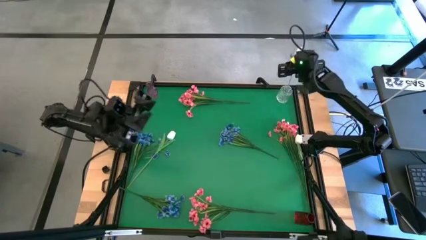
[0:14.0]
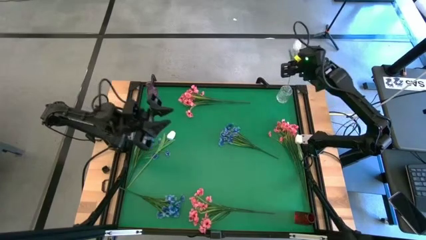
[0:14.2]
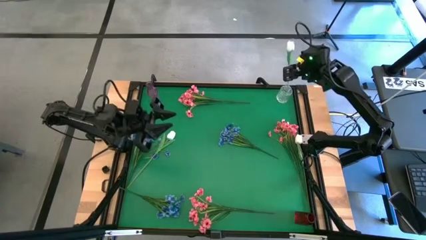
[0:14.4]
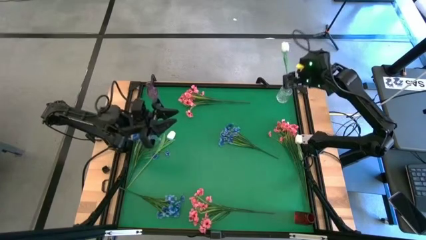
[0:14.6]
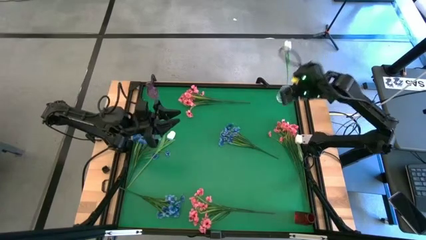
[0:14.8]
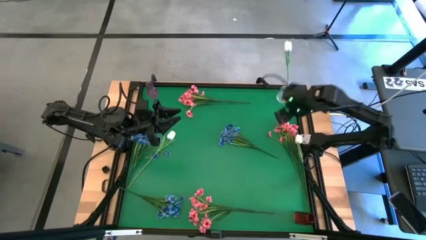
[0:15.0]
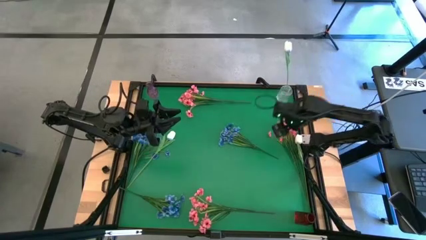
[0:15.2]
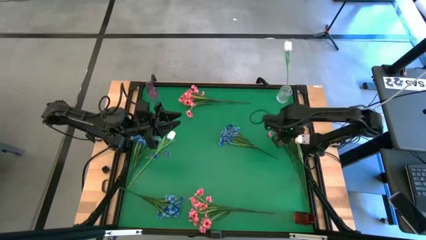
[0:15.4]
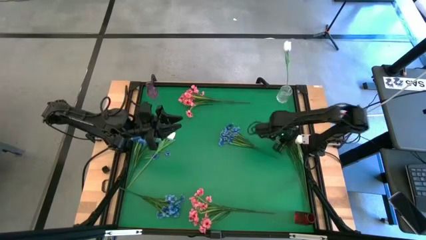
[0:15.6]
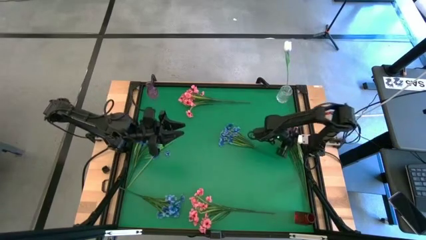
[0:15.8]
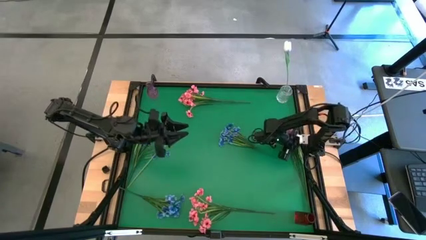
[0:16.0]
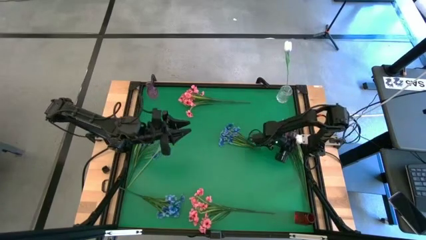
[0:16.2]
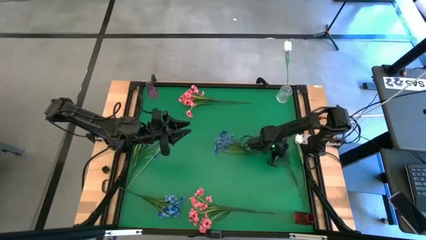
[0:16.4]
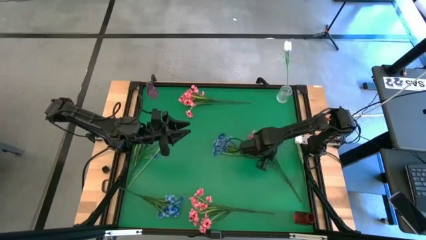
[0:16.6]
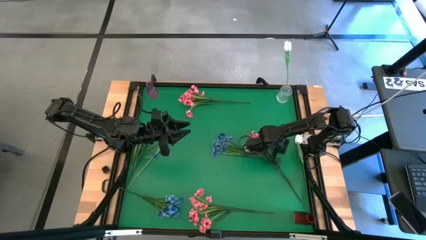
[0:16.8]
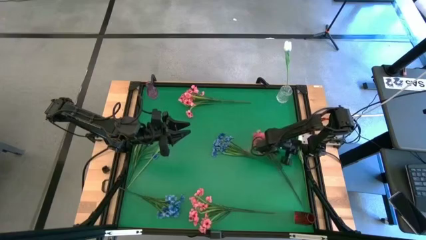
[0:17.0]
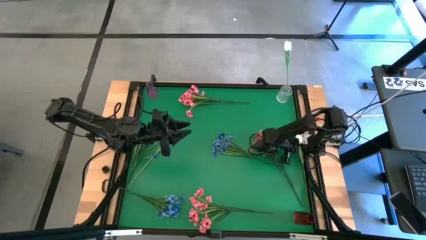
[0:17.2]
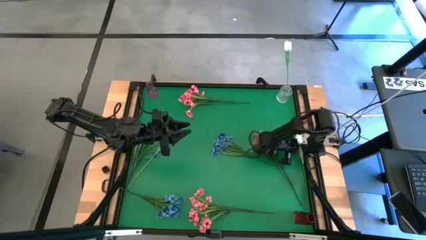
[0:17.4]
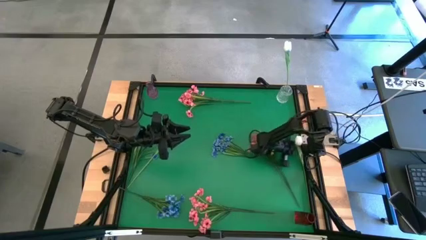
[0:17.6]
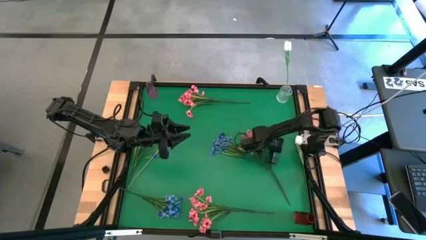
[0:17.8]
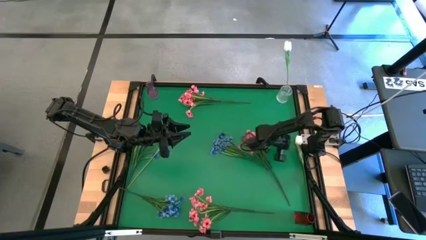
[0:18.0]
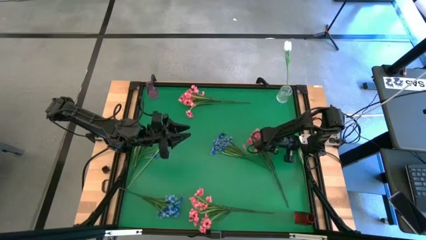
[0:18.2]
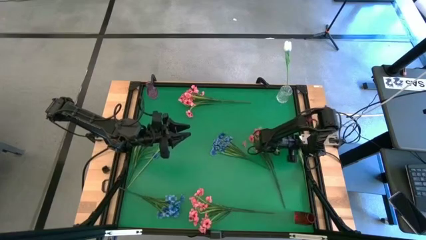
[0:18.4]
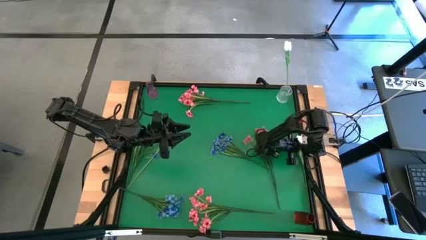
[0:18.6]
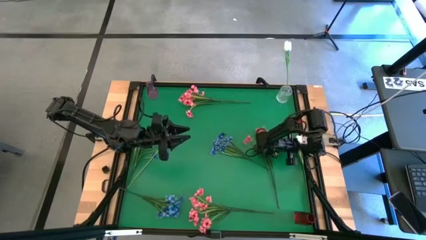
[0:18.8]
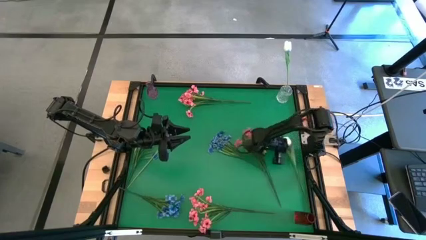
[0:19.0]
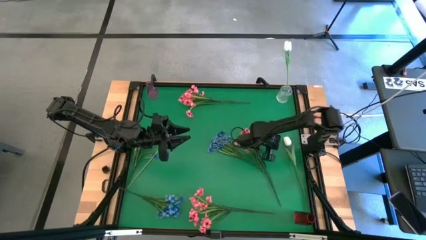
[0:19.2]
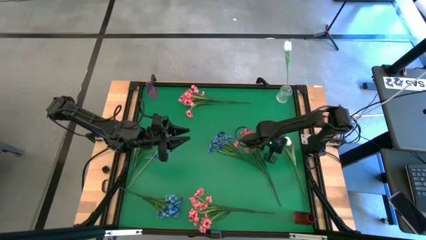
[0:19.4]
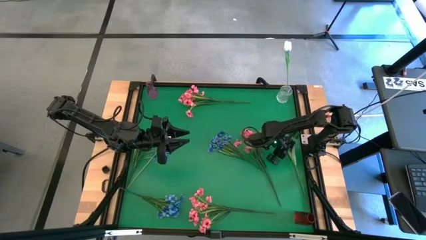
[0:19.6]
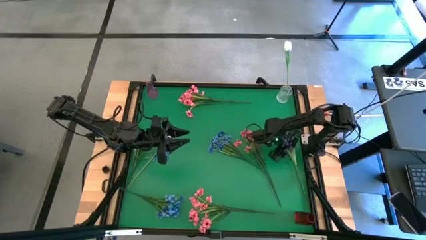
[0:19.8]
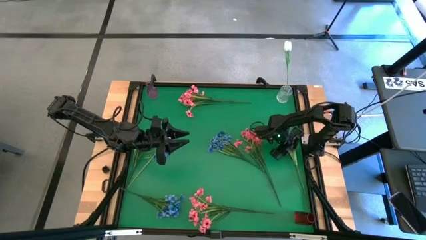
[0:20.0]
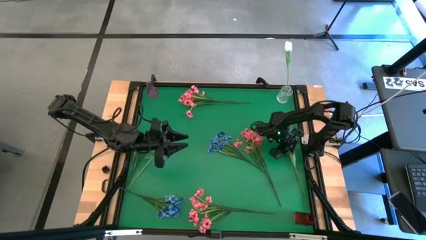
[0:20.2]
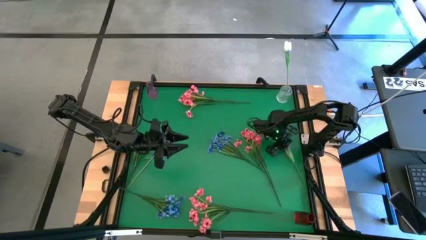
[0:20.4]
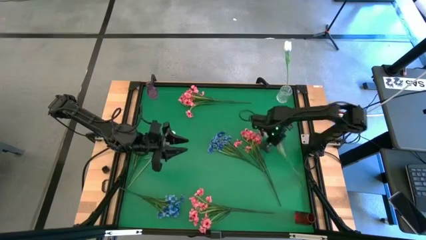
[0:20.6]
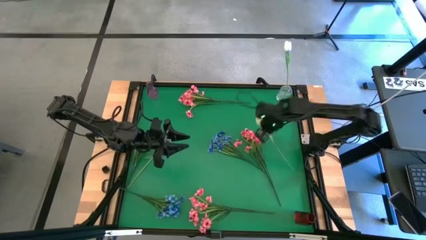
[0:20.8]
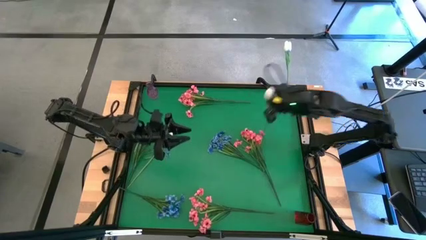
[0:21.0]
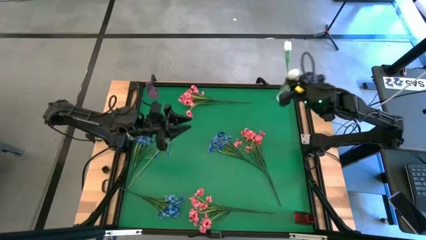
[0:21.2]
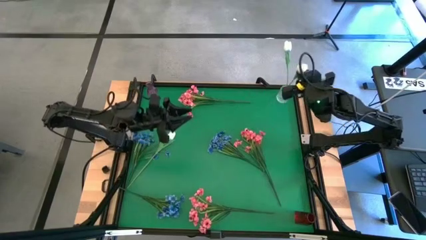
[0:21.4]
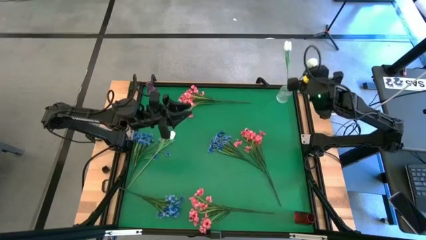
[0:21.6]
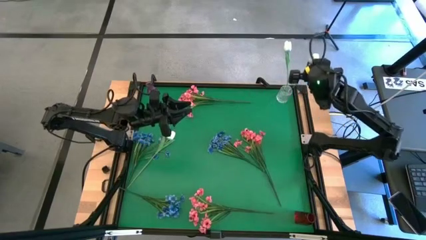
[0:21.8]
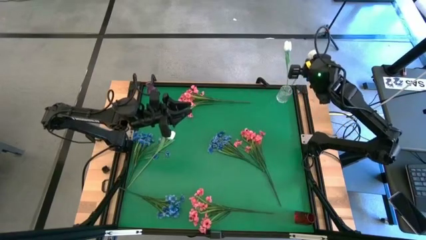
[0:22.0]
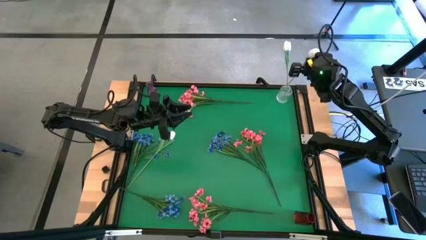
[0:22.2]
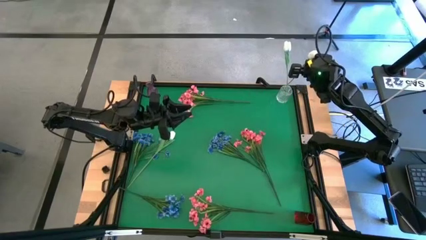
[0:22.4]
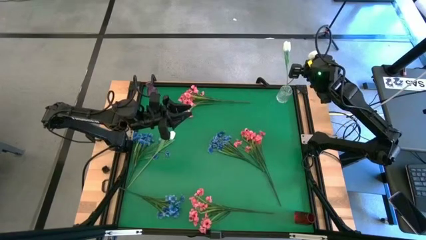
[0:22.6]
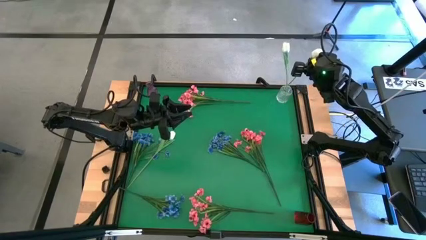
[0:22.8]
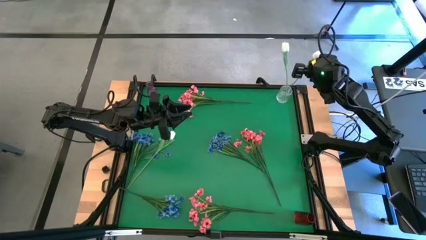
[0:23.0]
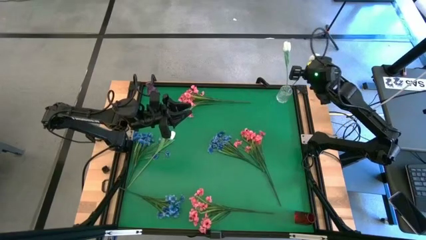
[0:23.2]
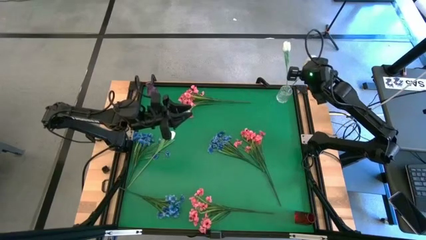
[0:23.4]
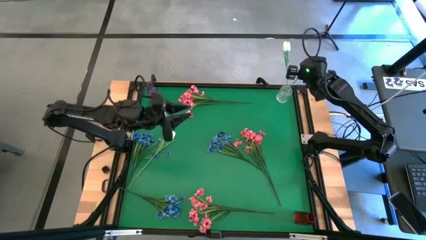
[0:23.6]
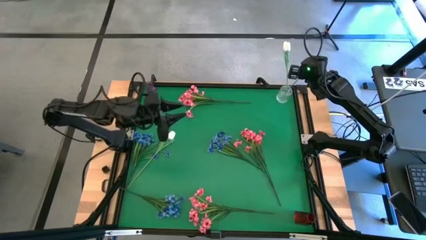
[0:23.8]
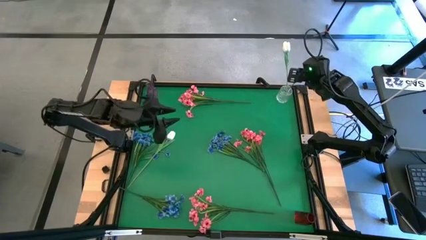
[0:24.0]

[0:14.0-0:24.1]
Task: Sort flowers into vase by color
Put the right white flower into the transparent vase

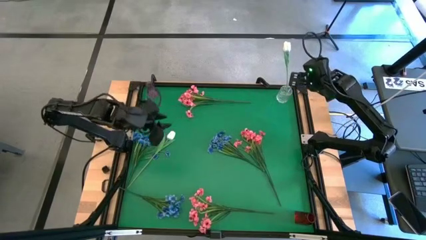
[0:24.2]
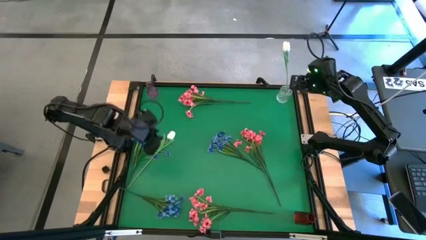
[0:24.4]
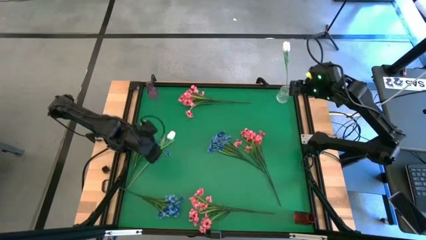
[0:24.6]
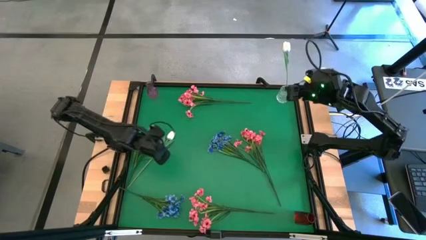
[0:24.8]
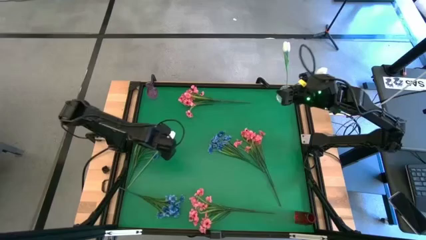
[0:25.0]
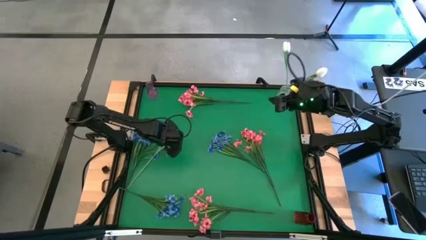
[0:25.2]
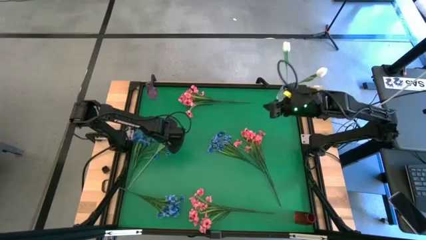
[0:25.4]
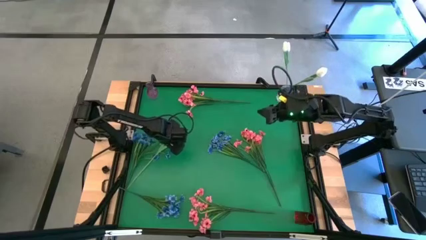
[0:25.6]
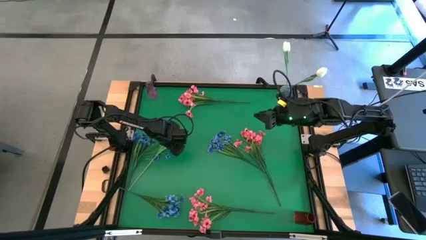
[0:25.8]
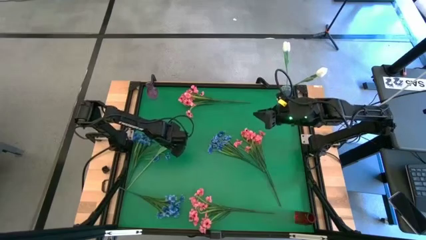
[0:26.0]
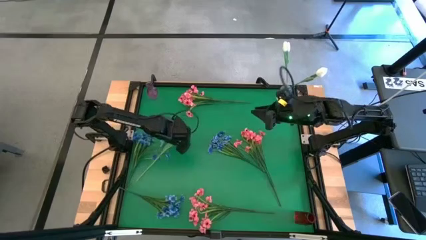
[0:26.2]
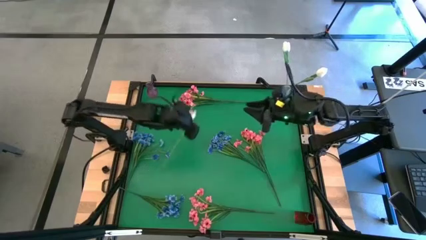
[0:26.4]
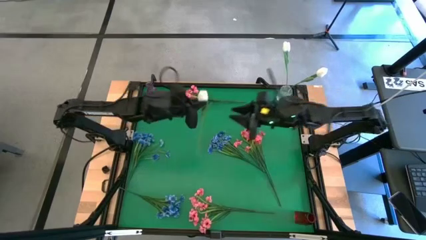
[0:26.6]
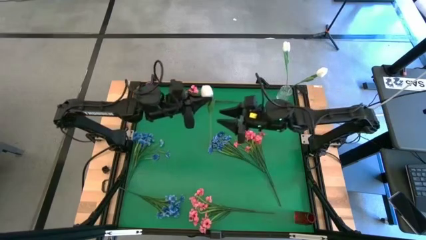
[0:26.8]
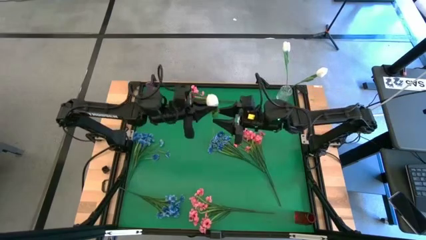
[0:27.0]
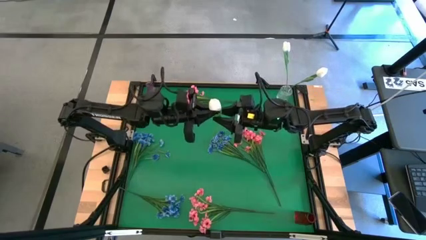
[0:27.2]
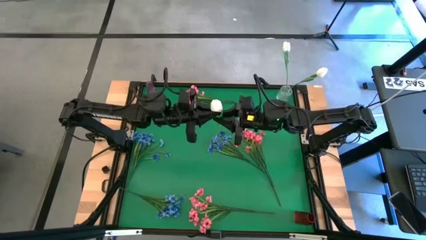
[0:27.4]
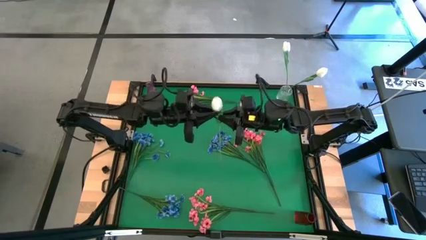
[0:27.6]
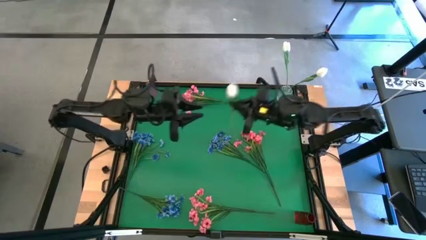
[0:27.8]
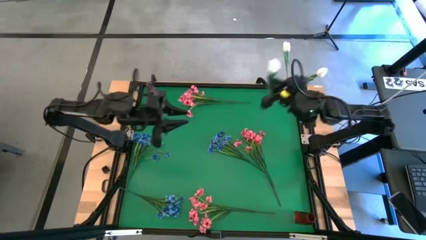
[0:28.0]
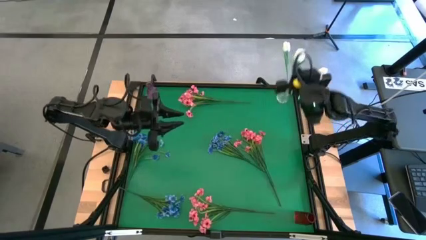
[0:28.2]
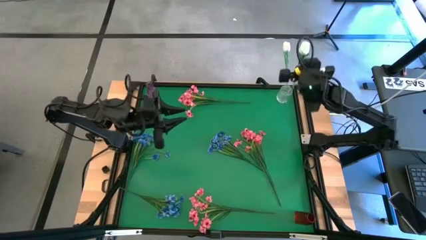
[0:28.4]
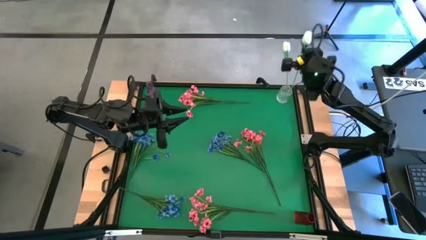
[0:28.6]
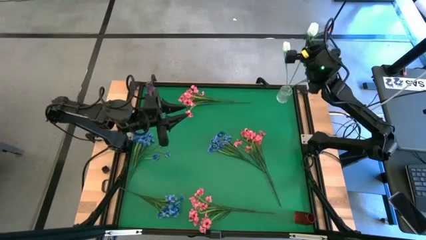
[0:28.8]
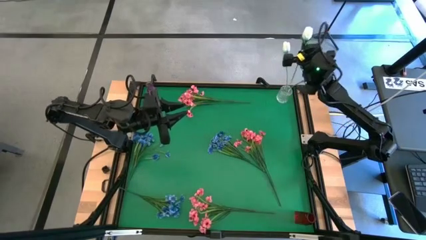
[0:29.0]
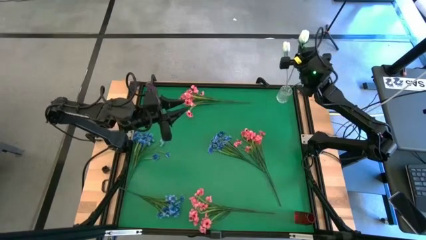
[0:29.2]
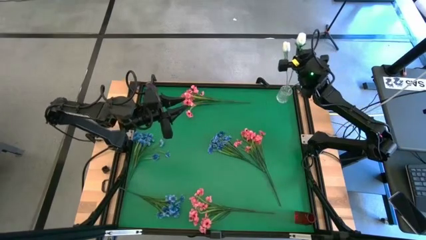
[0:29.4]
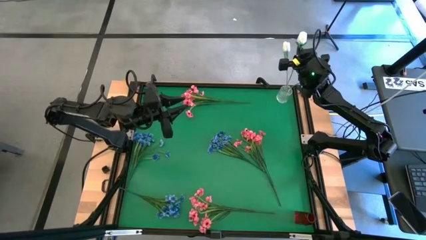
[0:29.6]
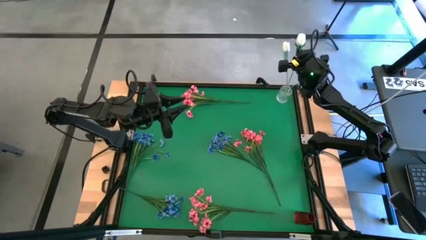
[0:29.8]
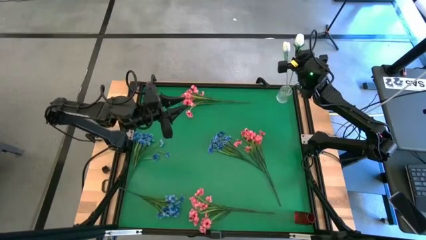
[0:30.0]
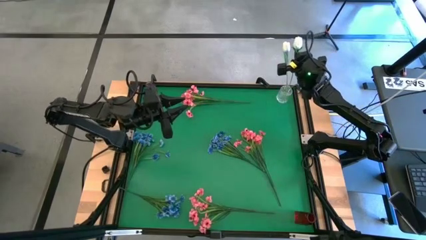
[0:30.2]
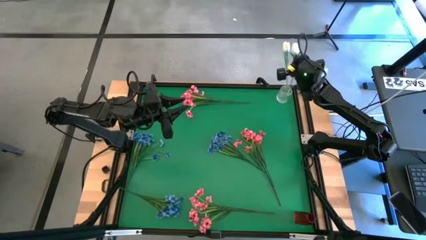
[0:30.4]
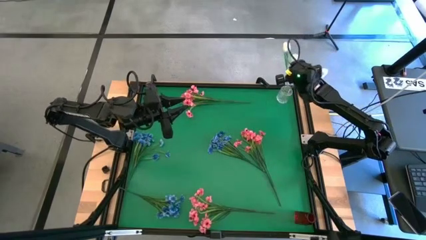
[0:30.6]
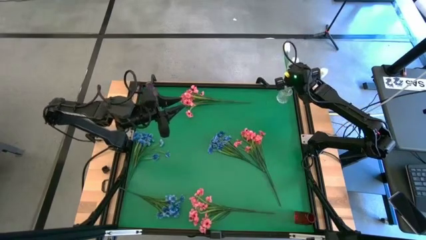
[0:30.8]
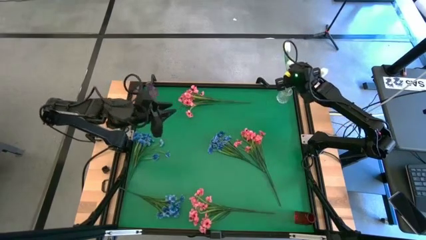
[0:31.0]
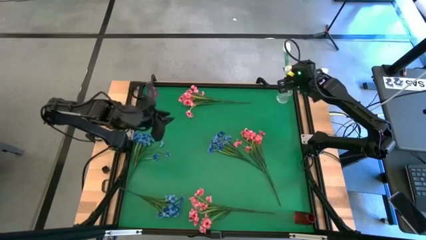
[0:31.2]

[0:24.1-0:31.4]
Put the white flower into the transparent vase
